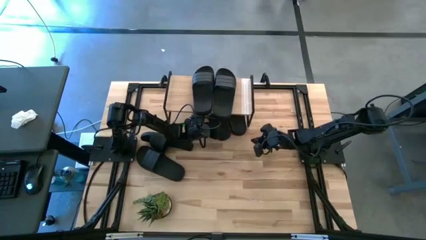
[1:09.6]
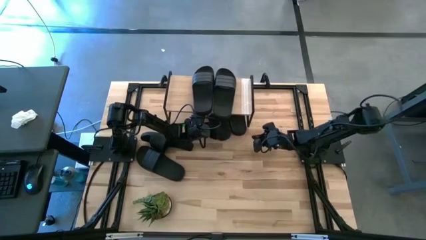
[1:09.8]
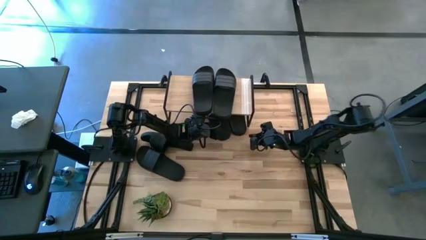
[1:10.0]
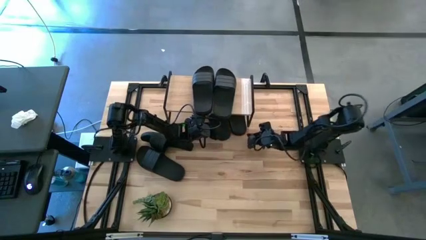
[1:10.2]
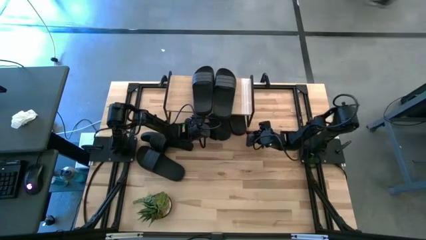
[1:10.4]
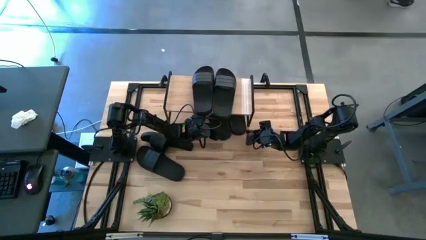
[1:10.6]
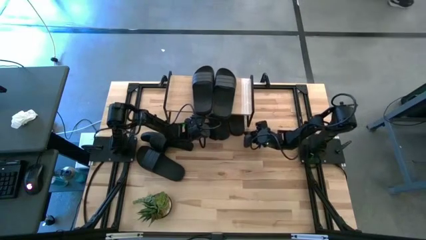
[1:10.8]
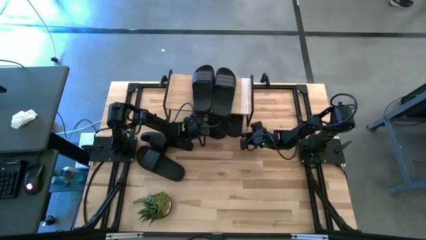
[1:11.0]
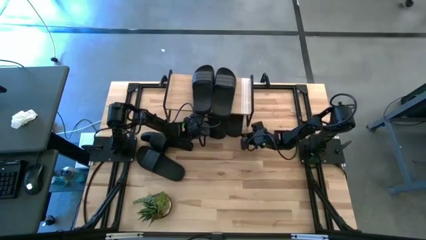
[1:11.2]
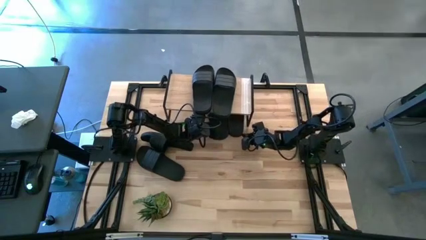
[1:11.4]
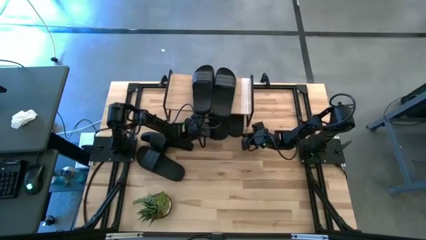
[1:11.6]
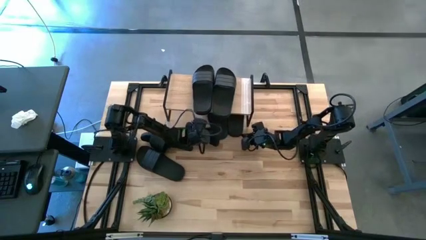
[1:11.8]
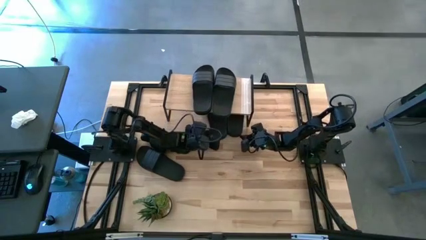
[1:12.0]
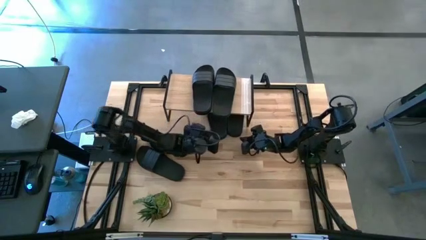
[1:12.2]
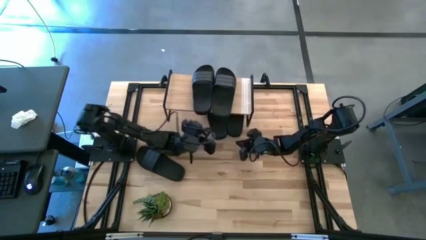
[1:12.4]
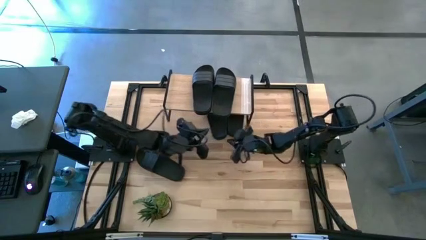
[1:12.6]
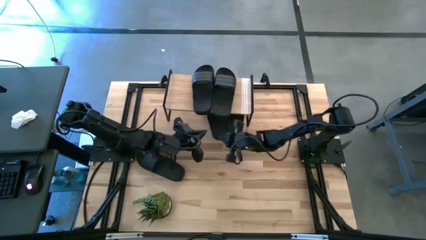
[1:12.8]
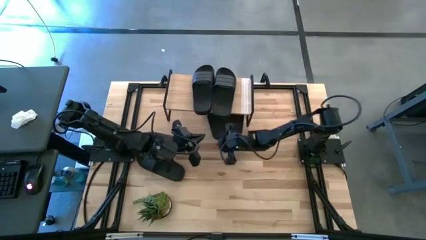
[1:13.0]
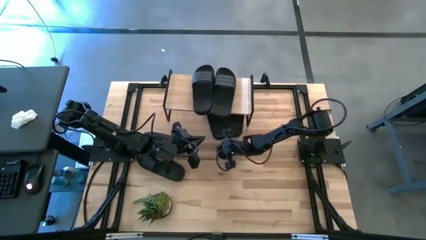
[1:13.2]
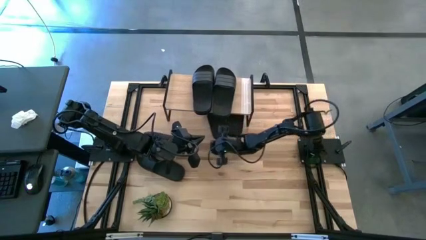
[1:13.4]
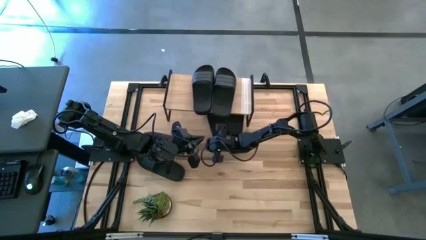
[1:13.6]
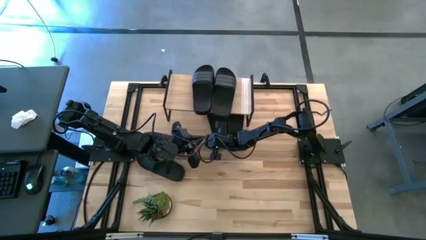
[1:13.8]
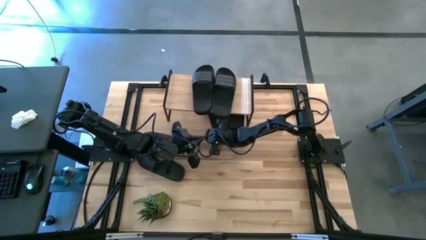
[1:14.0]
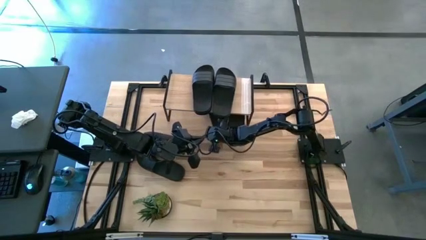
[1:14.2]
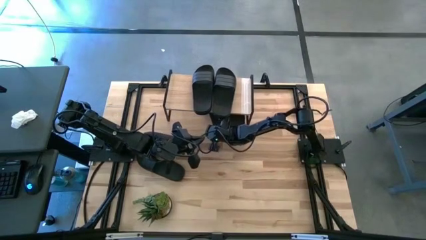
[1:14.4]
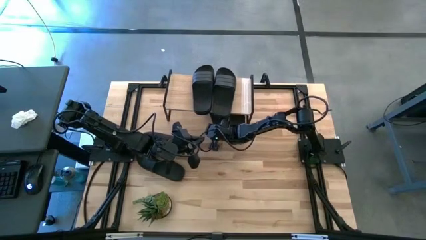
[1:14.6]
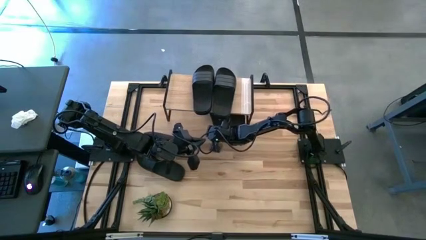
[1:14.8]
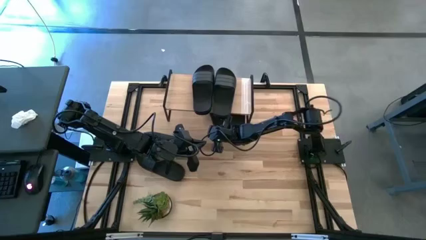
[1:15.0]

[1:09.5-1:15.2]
Task: Pick and place slides into the shelf
Adjust the black pair of slides under the shelf

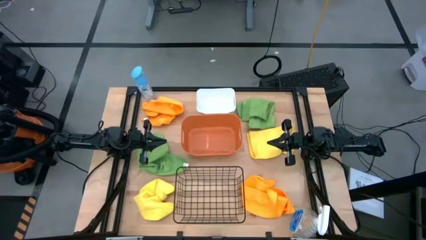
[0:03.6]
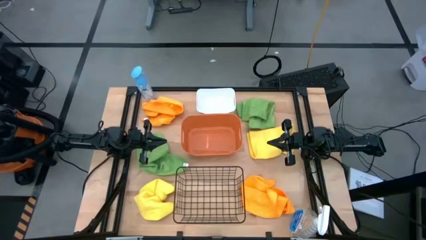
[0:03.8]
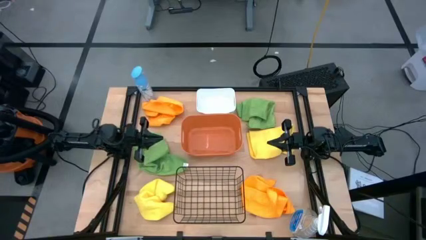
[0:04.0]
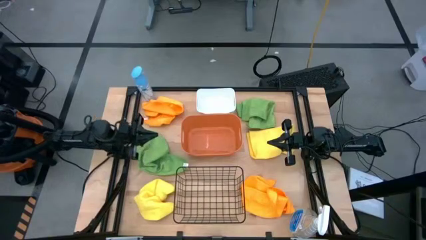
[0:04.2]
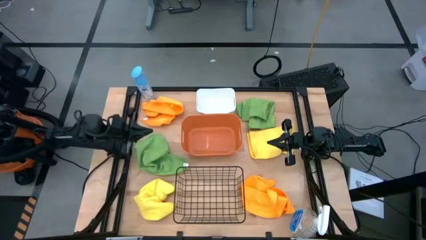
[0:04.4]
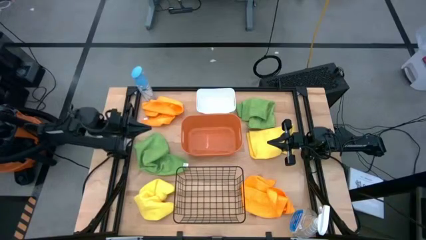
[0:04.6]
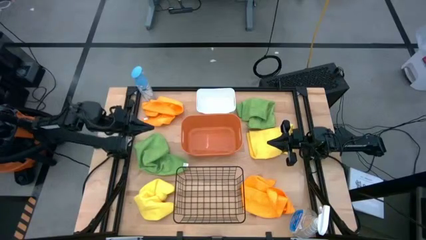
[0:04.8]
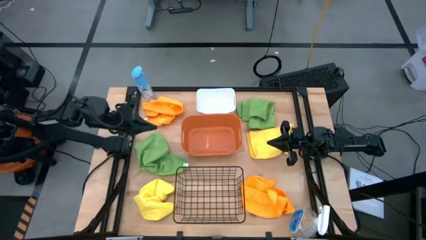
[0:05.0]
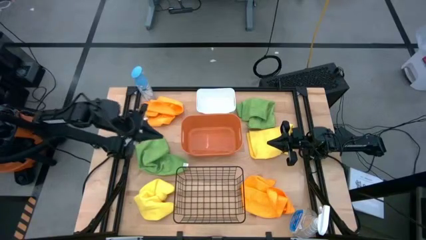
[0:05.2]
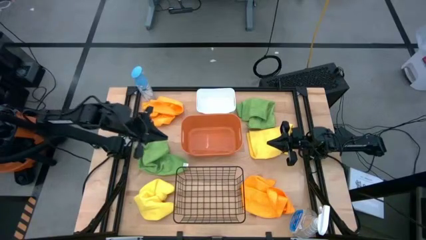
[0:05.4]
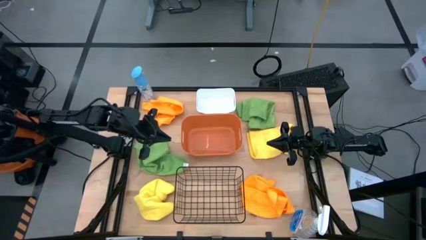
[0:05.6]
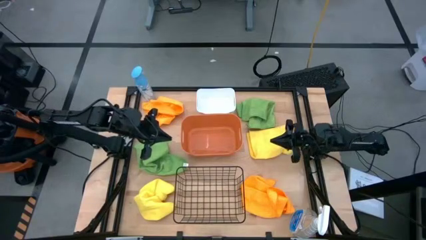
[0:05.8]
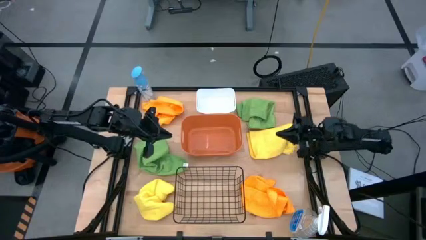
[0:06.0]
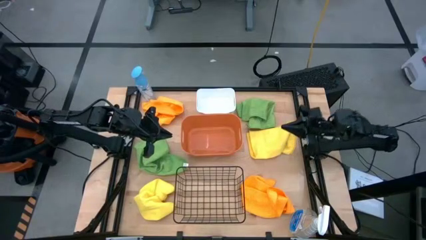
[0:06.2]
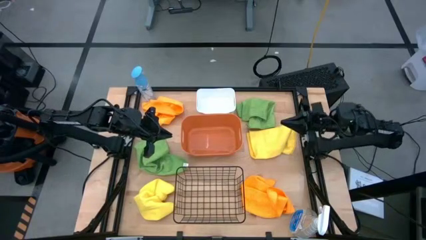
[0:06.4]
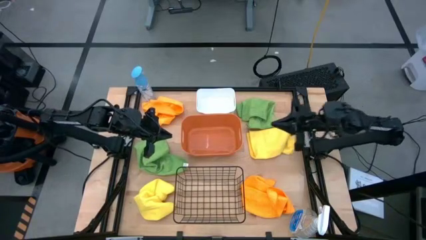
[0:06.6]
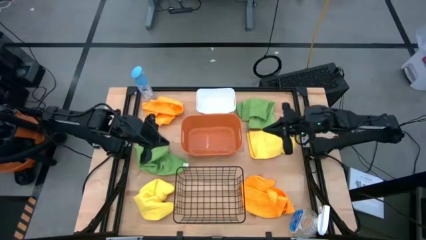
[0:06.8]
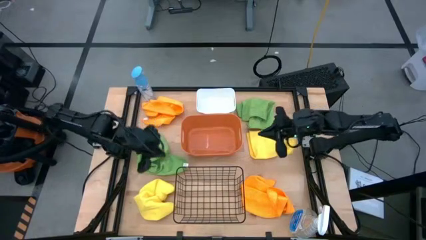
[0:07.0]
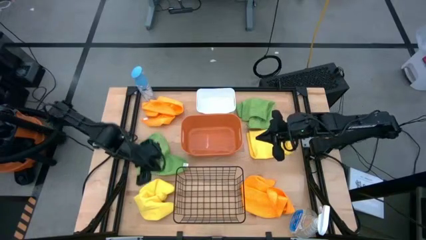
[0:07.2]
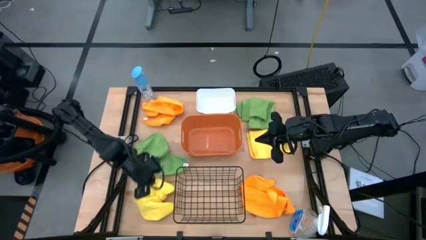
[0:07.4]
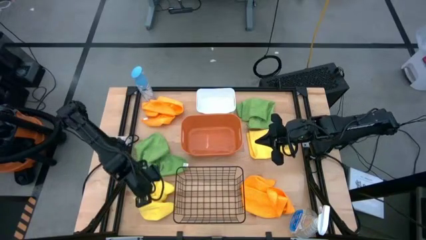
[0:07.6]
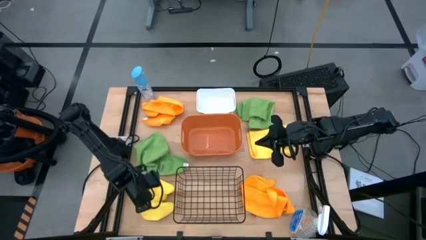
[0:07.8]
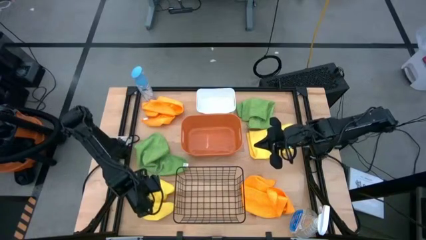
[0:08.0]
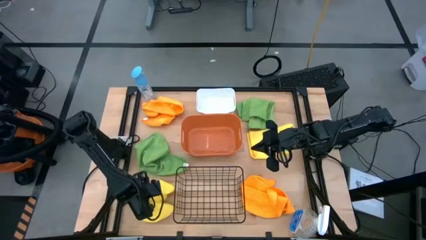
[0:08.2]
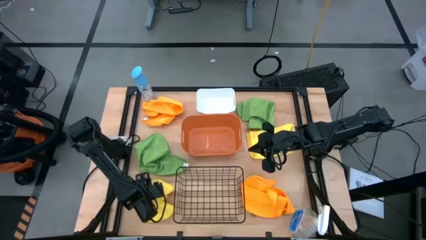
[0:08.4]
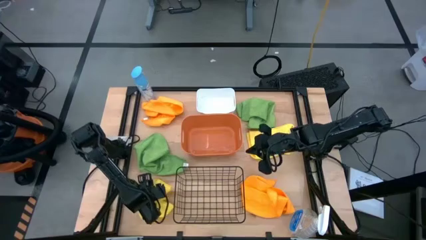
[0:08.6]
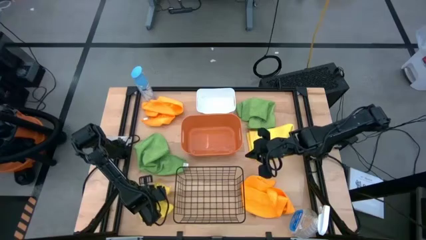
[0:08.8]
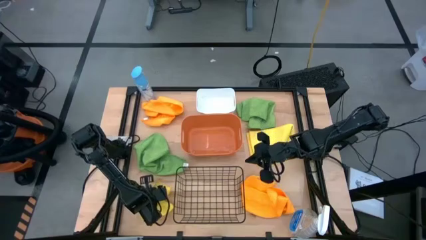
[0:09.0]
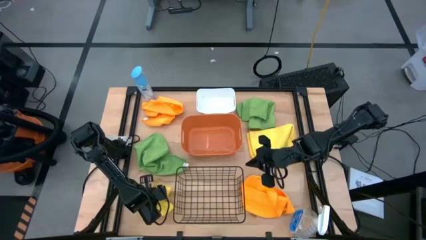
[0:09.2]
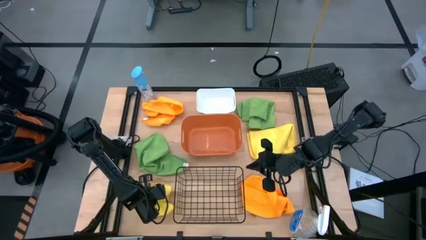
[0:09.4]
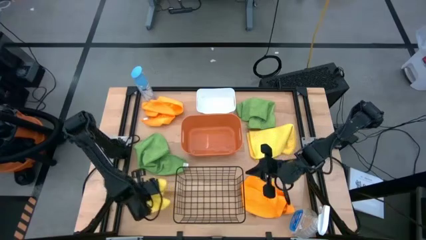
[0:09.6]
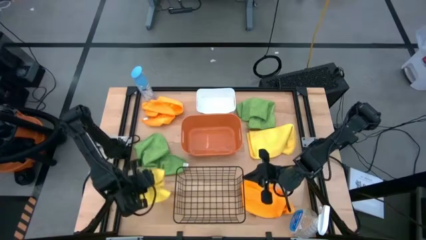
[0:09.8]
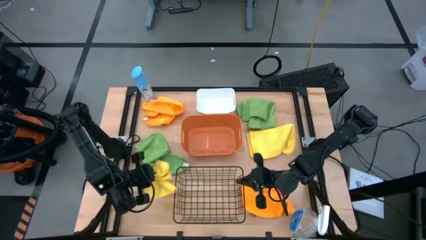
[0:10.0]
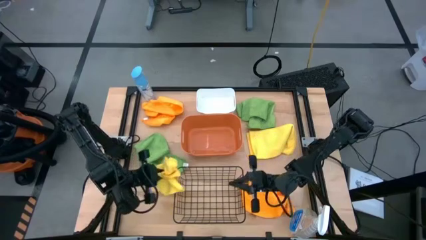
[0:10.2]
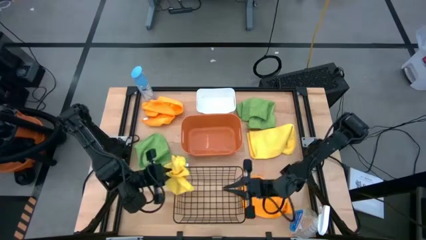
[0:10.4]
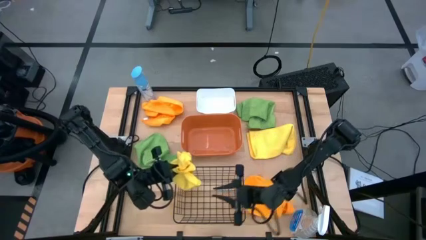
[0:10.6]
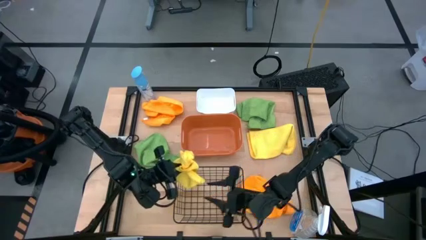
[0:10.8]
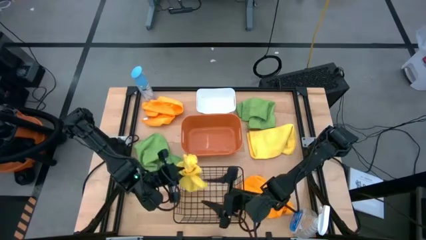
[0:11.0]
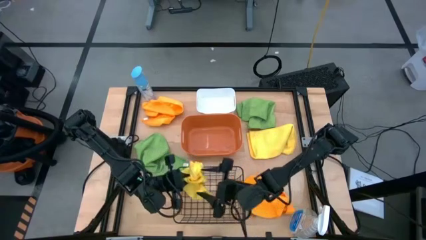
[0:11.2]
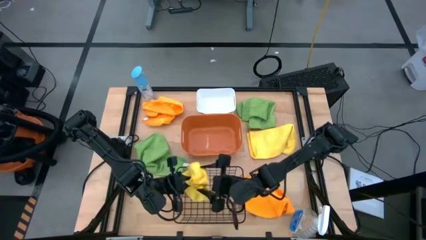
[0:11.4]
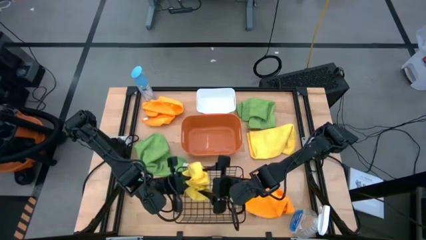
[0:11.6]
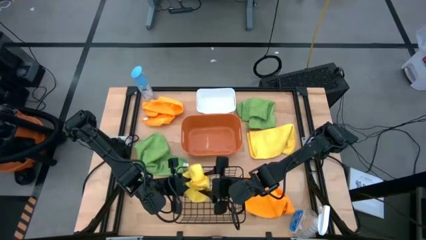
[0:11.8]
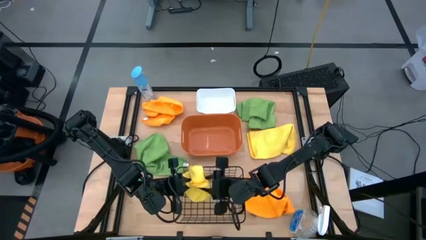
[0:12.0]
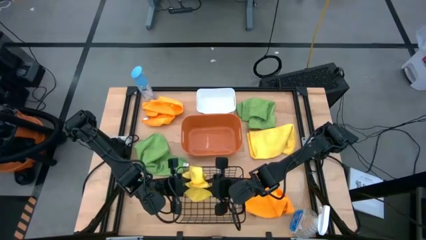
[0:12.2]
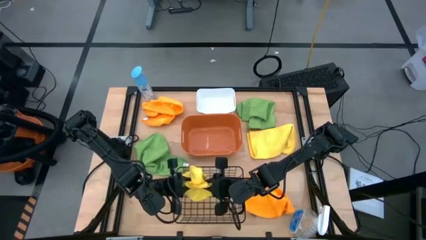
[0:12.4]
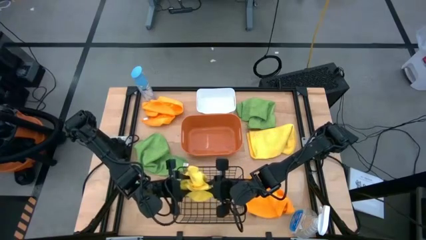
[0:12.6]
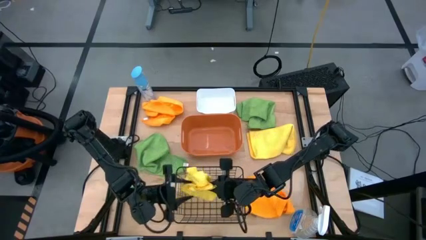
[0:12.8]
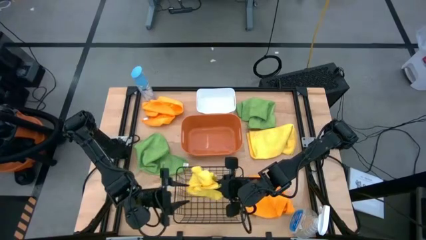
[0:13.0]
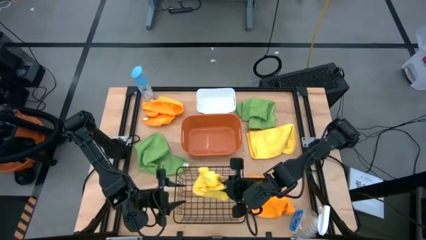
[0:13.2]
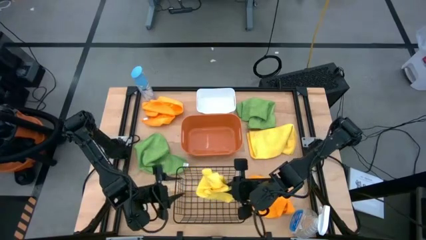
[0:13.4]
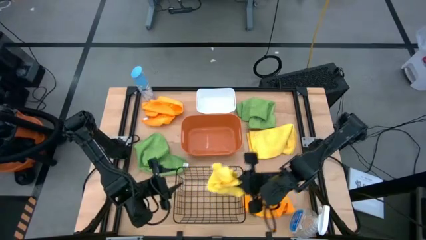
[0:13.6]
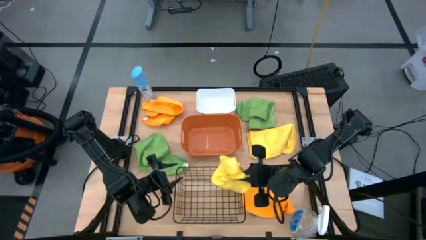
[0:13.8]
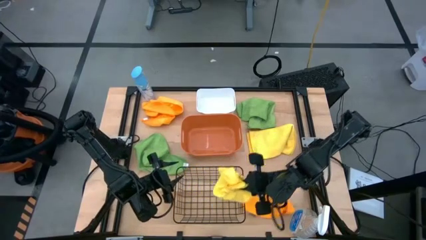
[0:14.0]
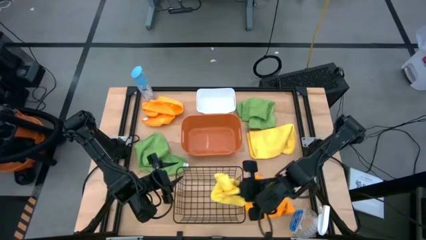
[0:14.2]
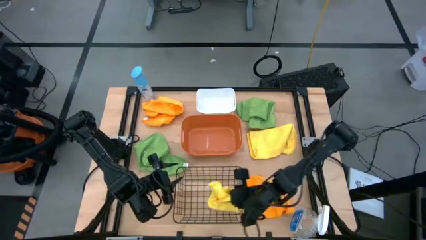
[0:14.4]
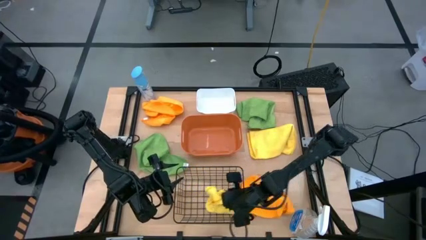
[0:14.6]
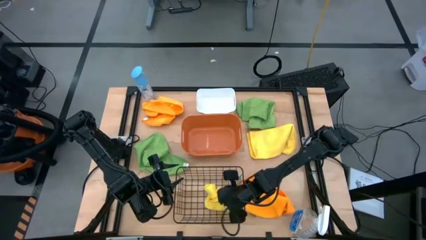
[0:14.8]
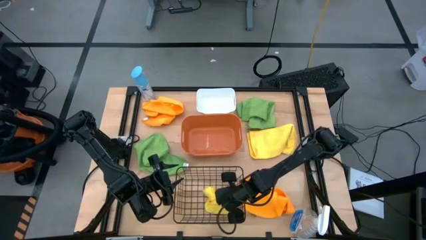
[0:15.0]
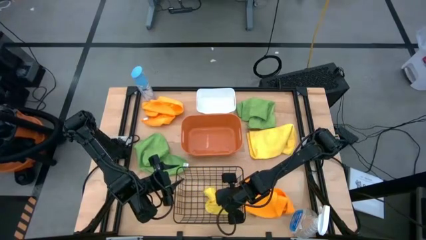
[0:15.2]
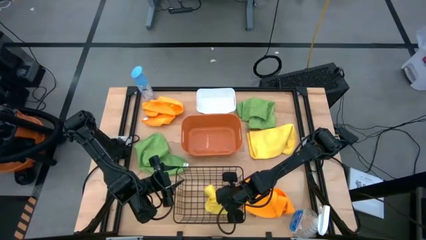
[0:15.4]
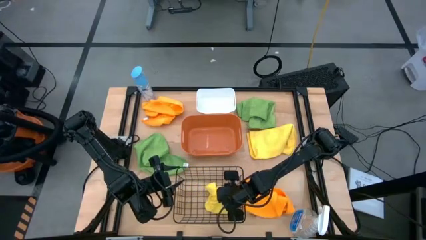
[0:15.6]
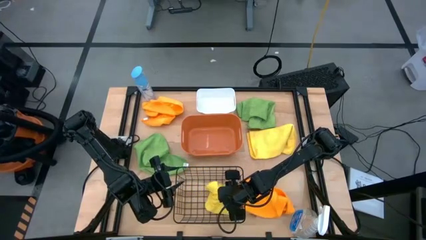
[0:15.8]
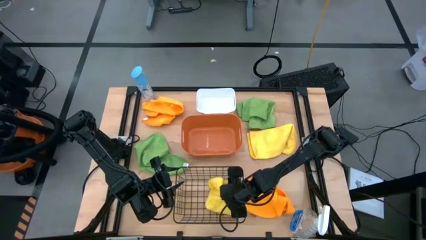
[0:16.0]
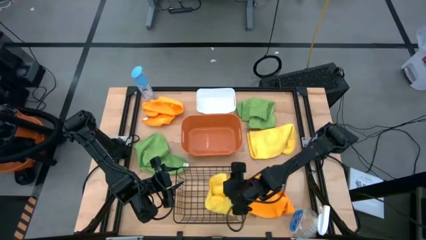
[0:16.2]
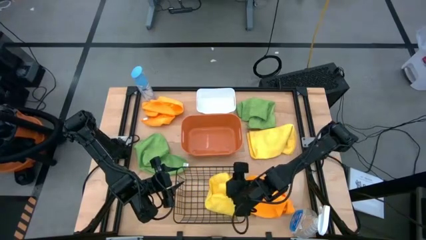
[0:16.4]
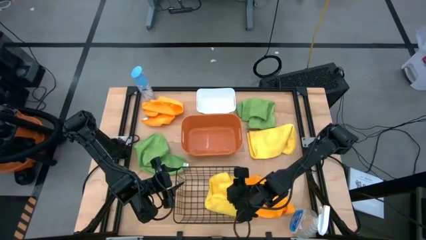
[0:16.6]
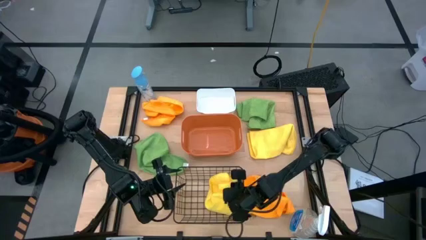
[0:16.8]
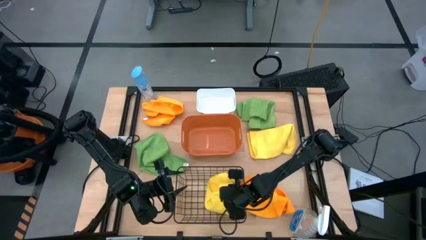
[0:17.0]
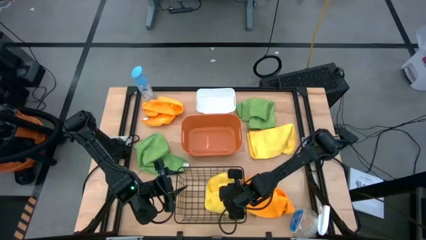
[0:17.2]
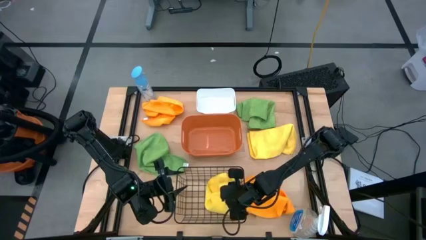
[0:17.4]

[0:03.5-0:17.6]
Task: Sort microfiber towel by color & place in baskets
Put the left yellow microfiber cloth into the black wire basket
